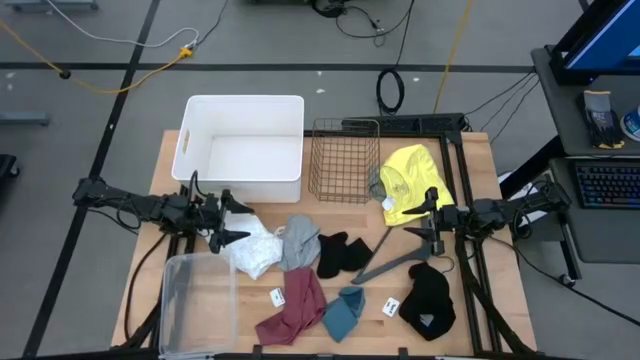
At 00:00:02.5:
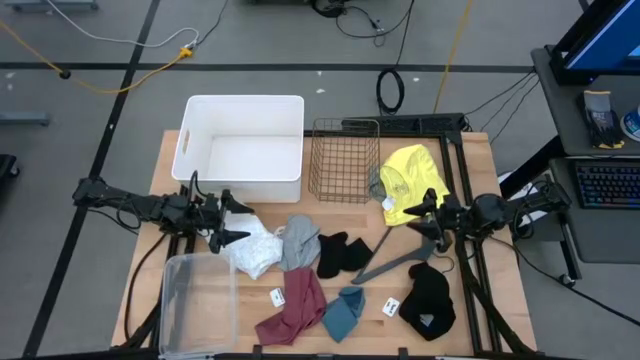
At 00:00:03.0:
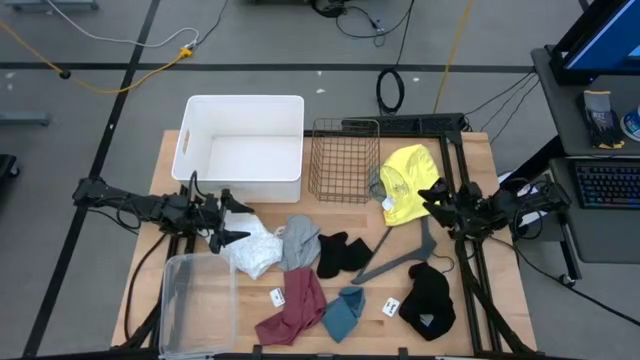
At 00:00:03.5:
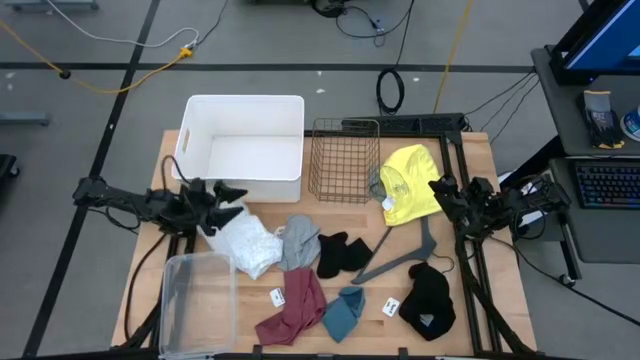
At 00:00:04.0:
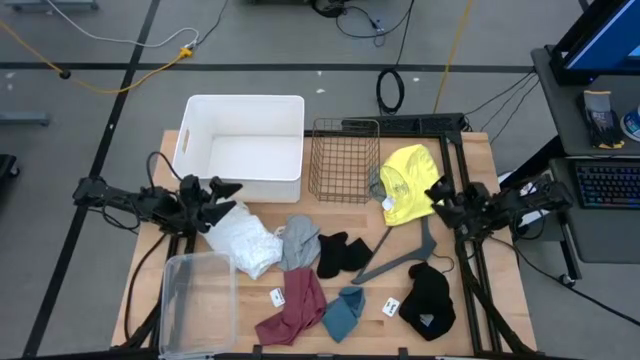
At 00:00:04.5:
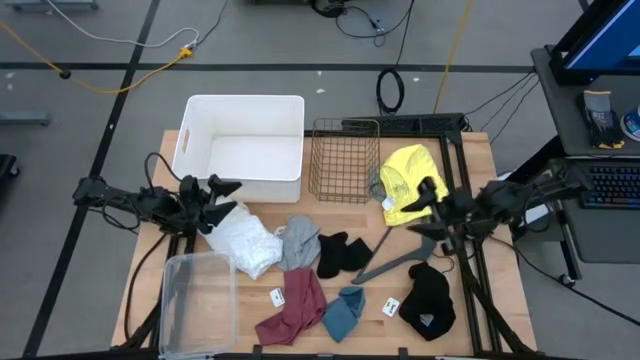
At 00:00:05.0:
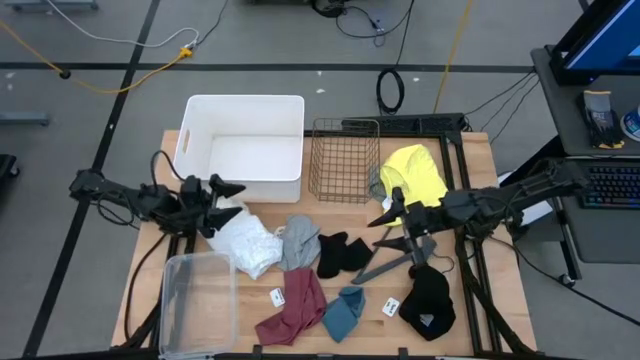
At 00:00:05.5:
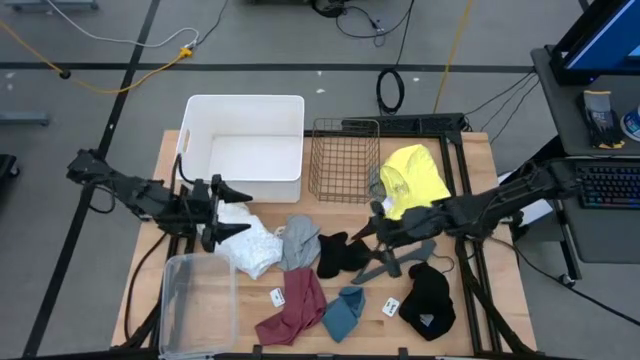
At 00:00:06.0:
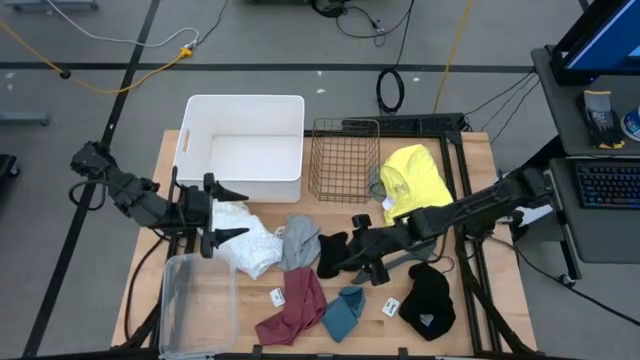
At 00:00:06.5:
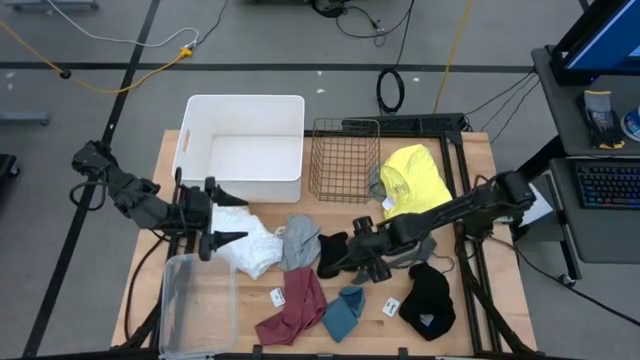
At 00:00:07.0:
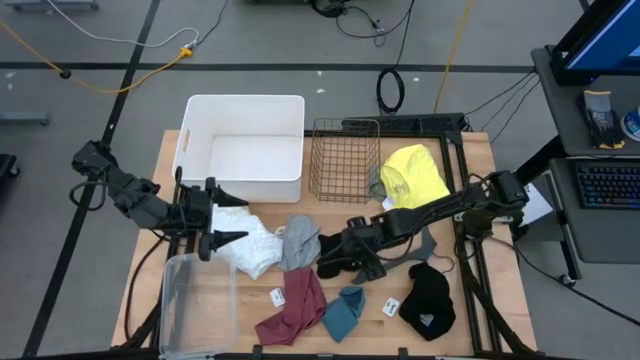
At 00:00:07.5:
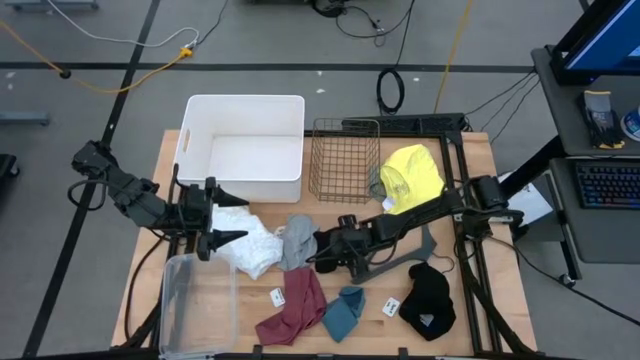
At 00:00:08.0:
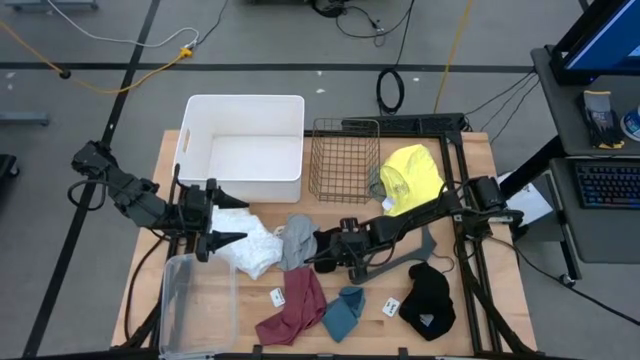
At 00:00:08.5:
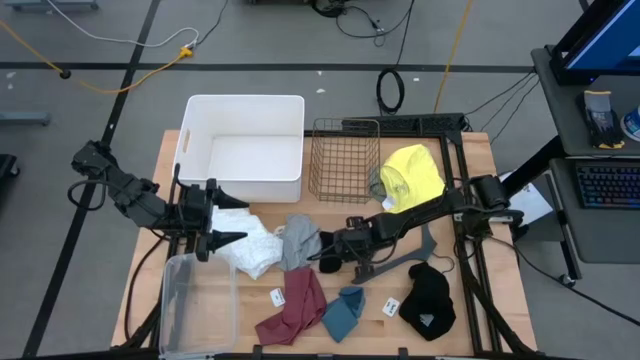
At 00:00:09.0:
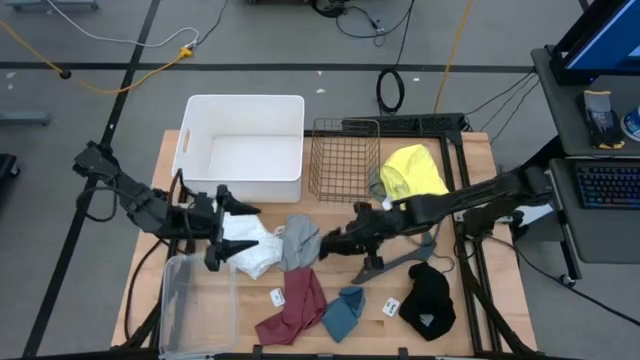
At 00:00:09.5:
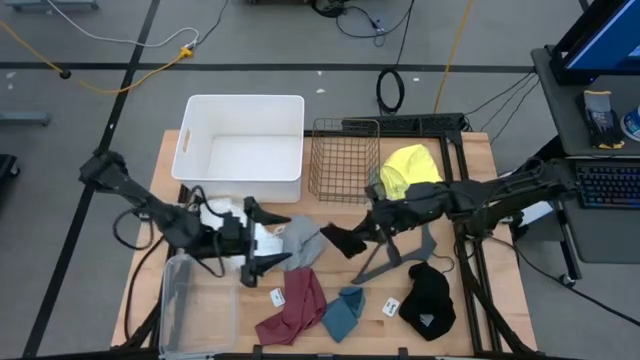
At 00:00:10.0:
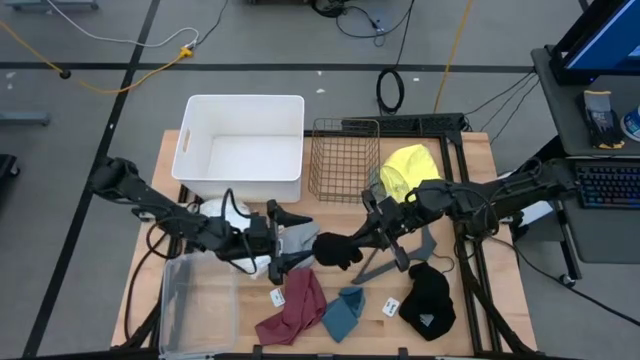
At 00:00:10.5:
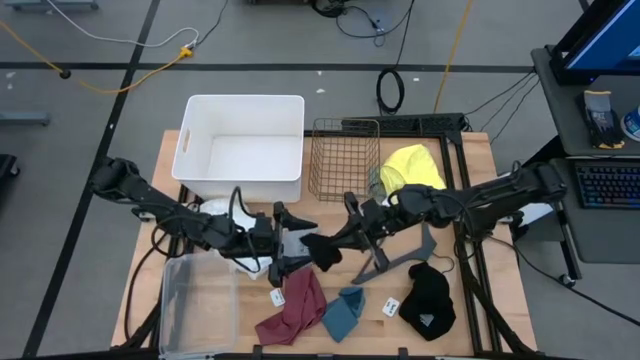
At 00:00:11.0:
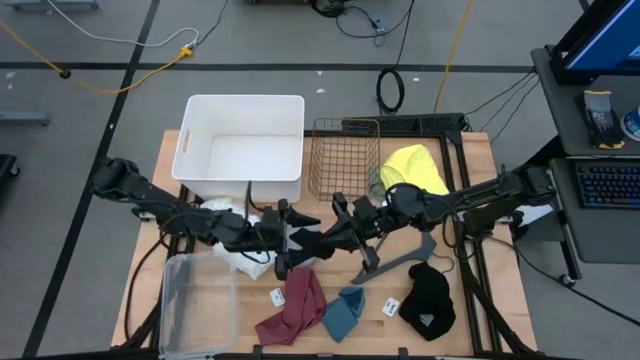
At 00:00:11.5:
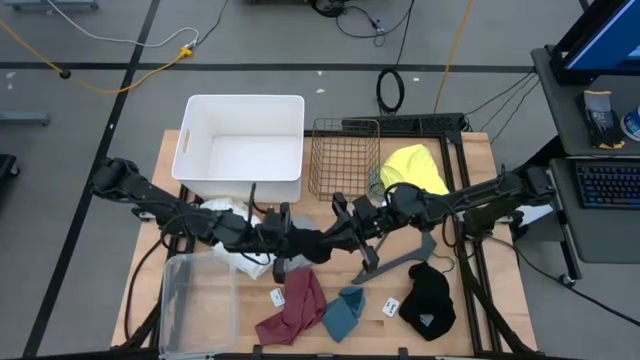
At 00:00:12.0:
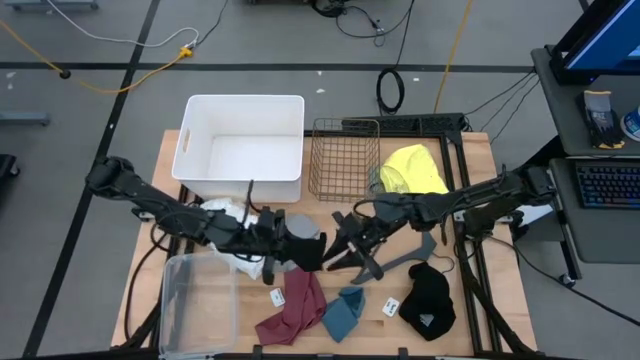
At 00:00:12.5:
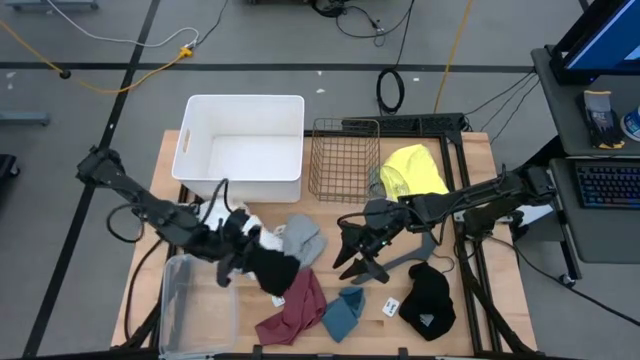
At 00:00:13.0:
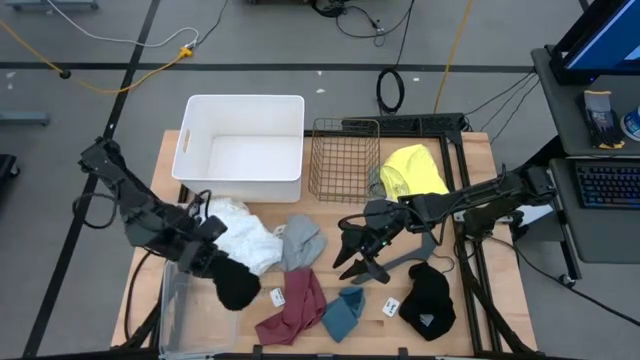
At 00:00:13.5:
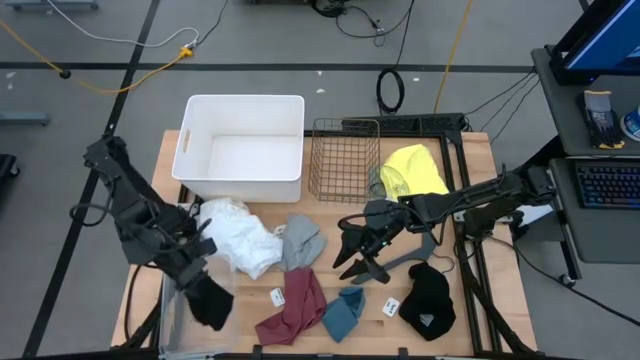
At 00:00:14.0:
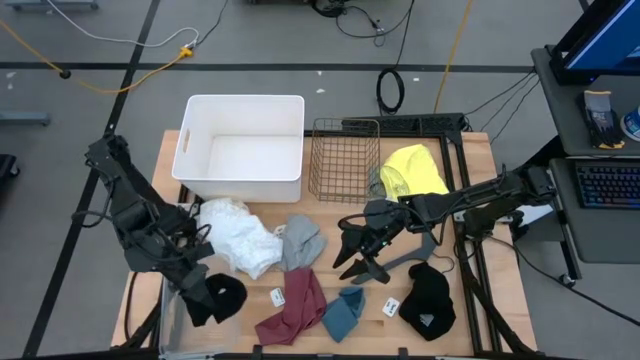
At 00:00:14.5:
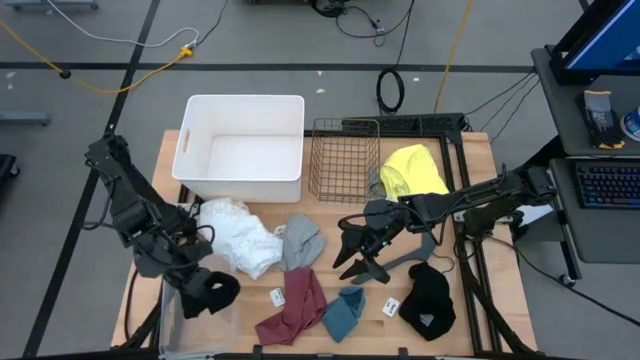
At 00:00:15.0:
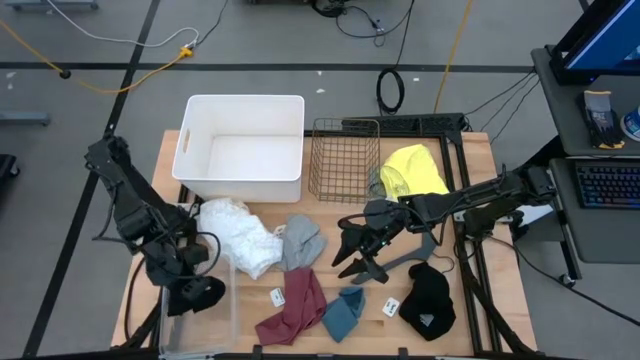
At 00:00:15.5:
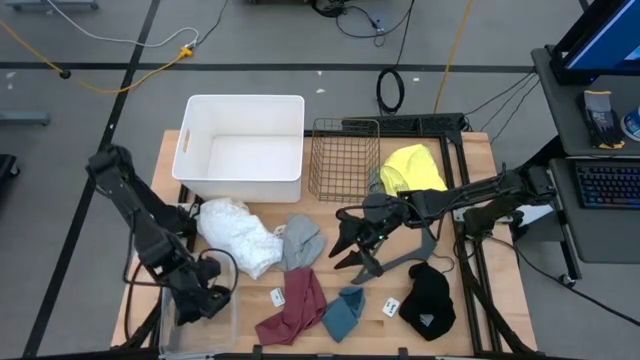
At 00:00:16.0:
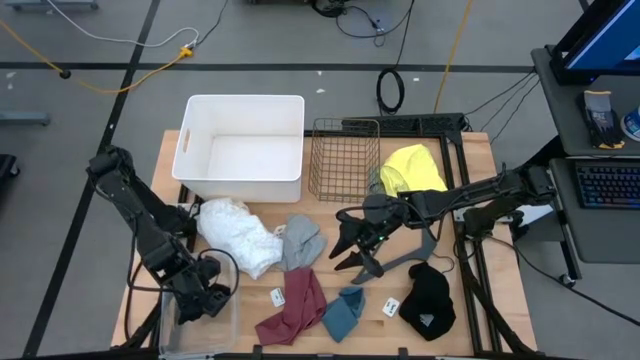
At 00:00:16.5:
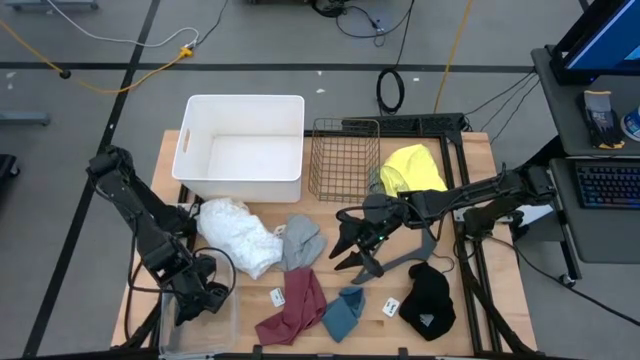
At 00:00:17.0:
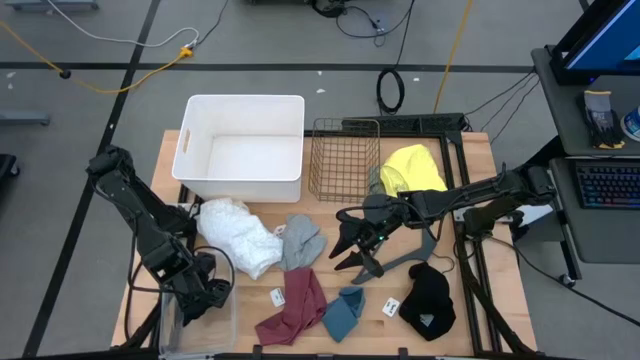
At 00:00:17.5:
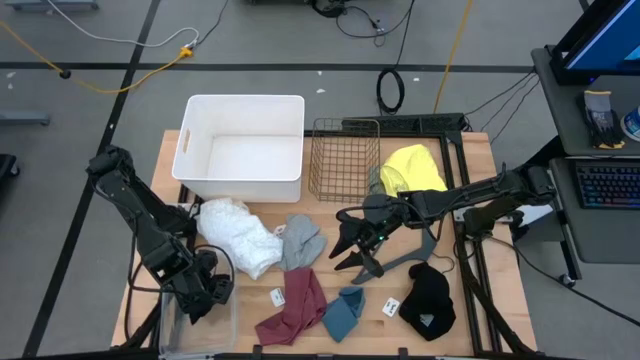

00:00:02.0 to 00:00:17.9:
Task: Pick & Place Cloths
Put the black sock into the transparent bin

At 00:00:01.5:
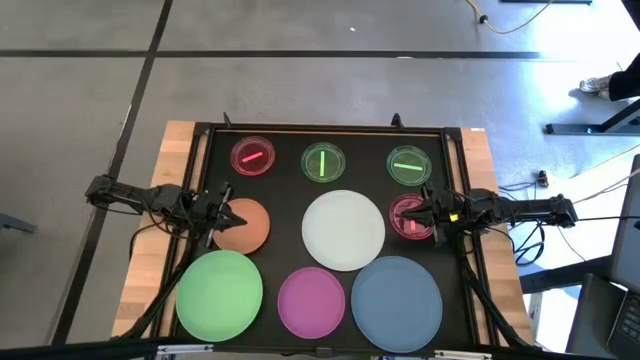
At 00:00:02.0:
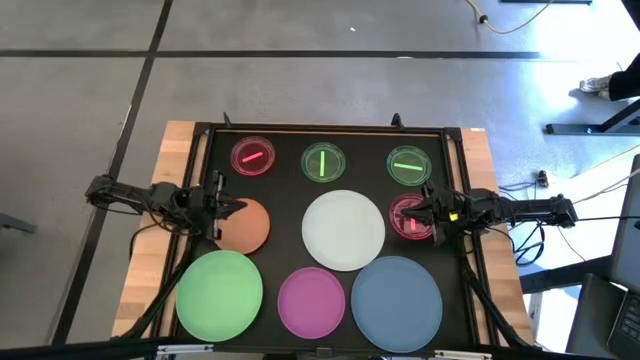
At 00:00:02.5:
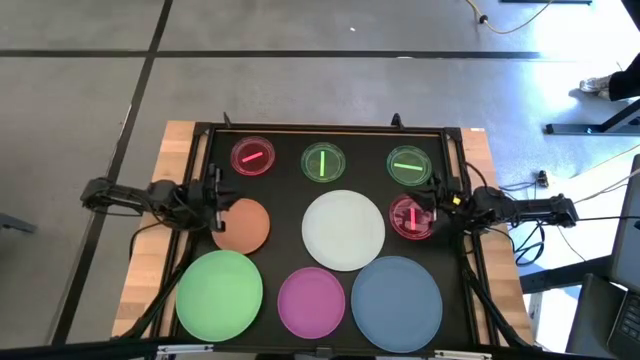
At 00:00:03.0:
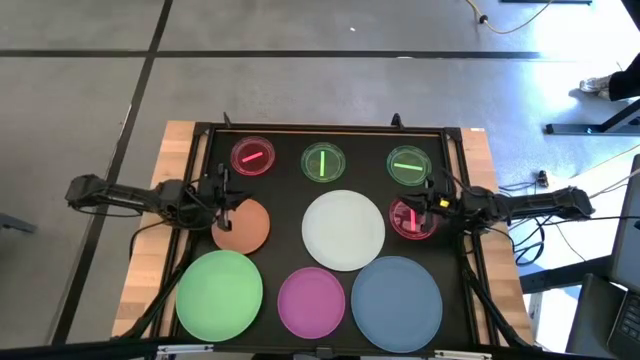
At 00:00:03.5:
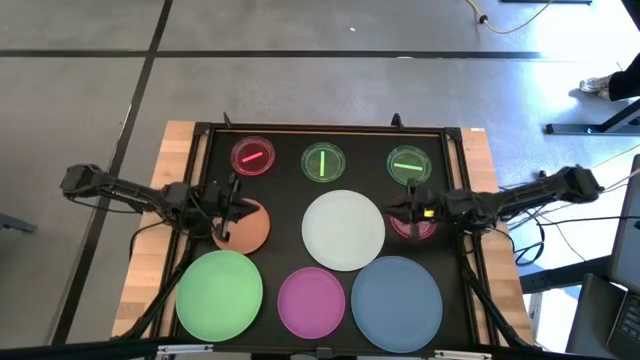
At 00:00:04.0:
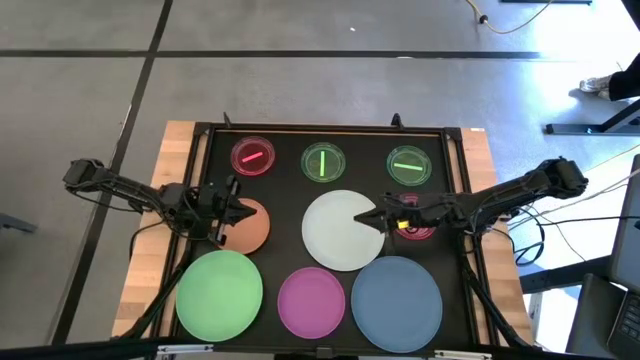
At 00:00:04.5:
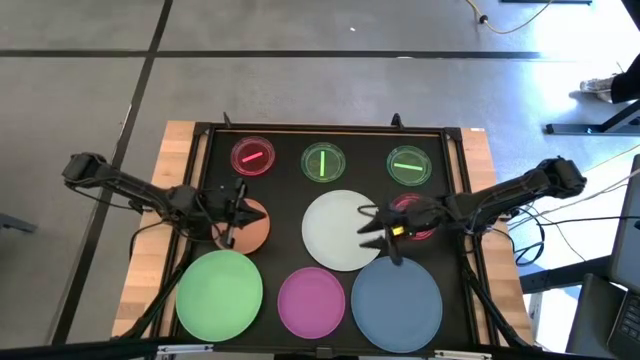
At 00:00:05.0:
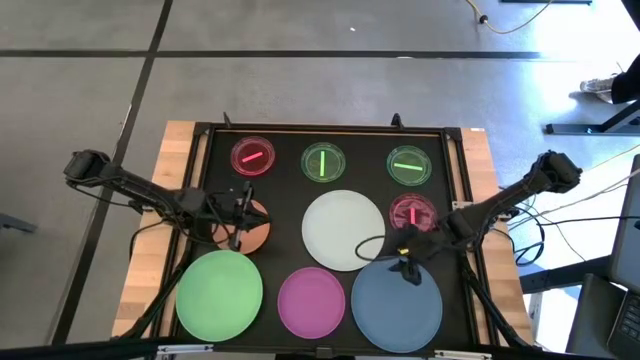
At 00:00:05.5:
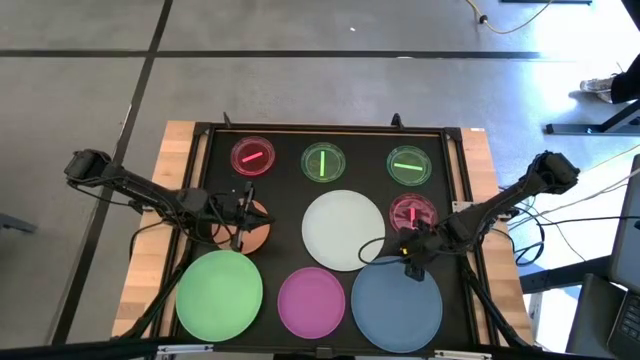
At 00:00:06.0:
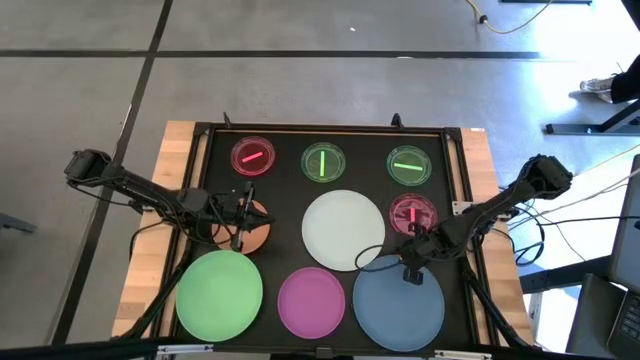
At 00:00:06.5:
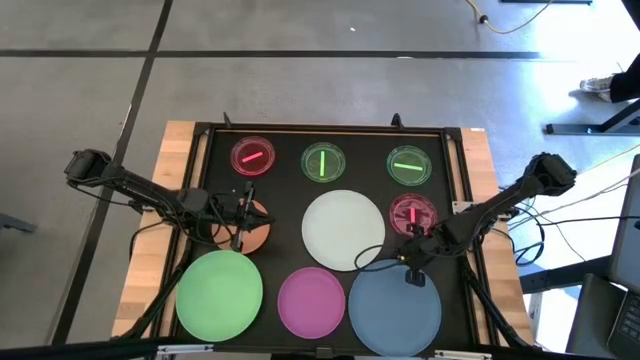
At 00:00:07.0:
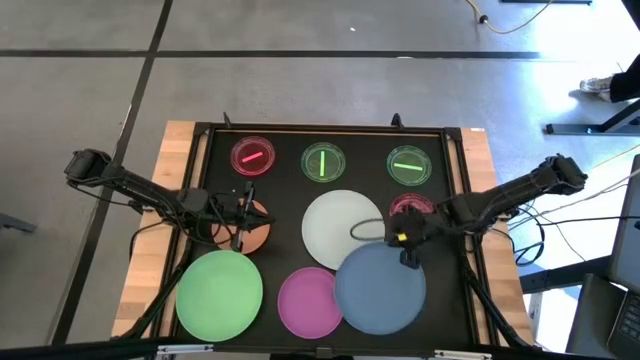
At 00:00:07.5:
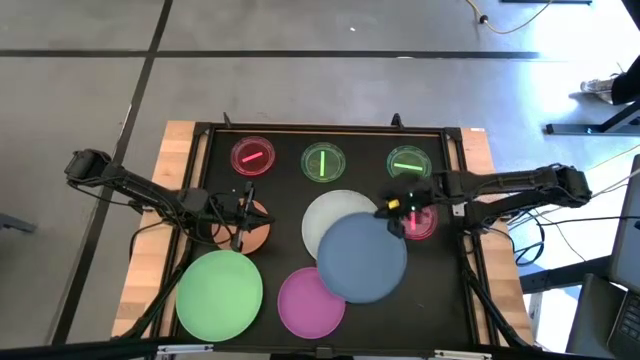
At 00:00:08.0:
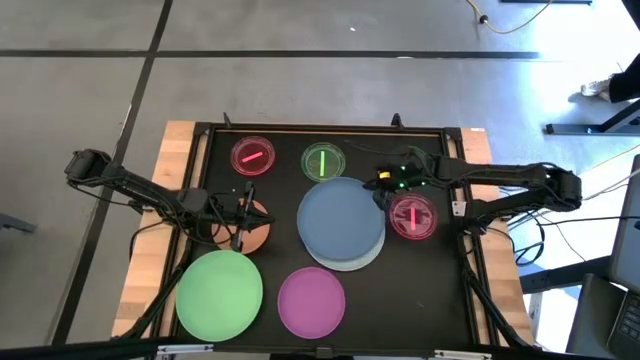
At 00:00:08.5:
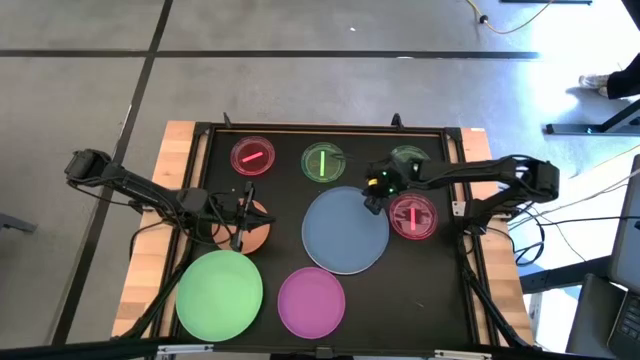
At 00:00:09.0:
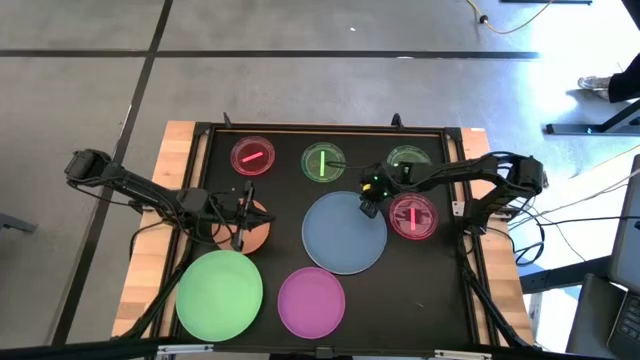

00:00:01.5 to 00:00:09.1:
Task: Stack plastic plates
Stack the blue plate on the white plate
